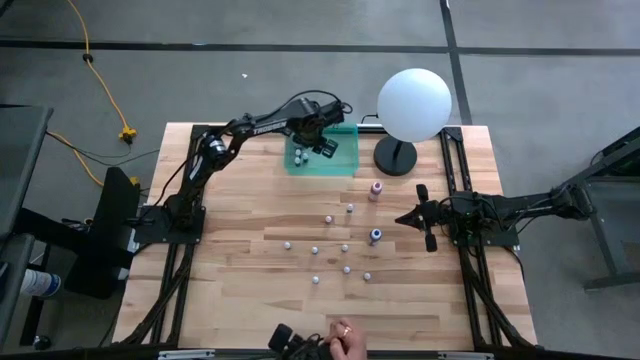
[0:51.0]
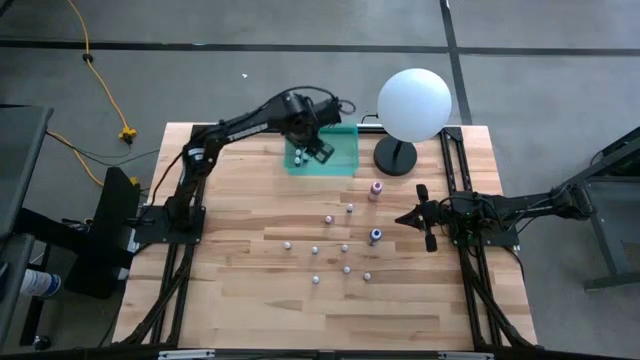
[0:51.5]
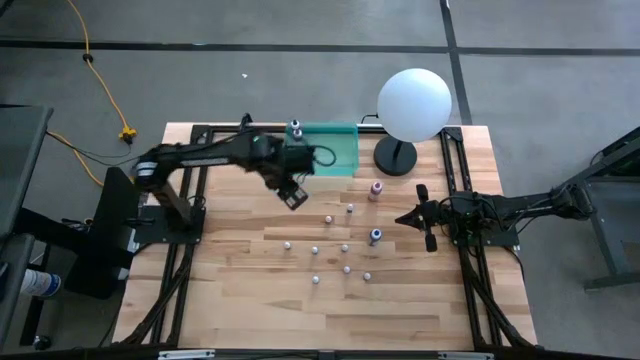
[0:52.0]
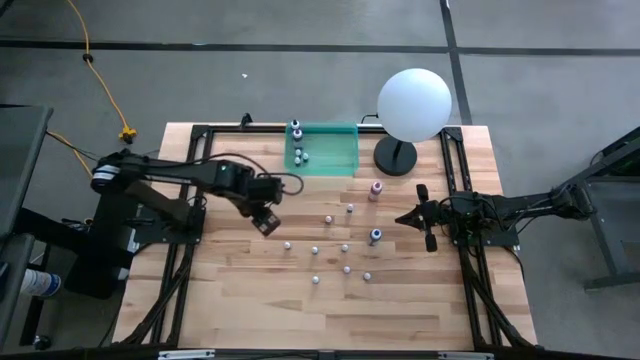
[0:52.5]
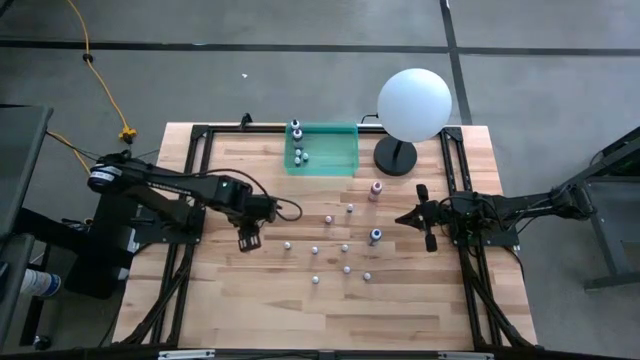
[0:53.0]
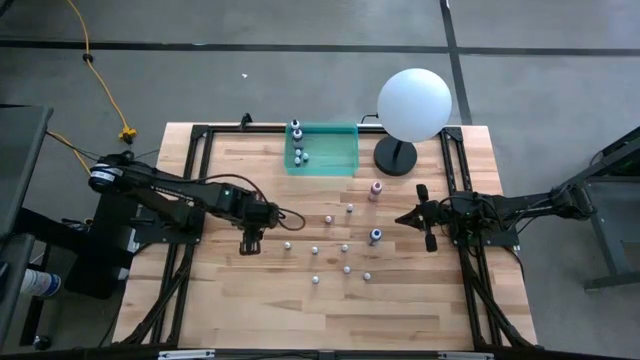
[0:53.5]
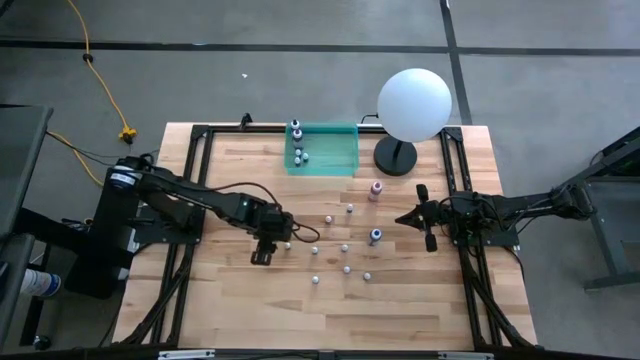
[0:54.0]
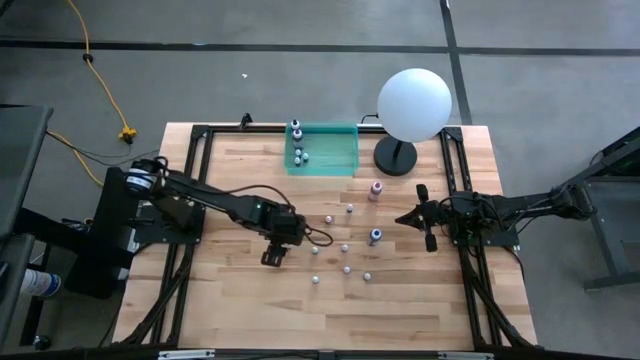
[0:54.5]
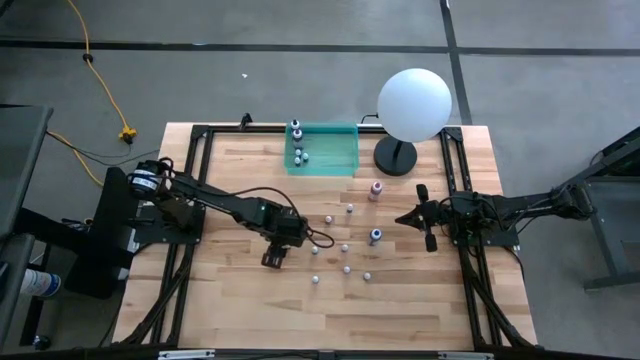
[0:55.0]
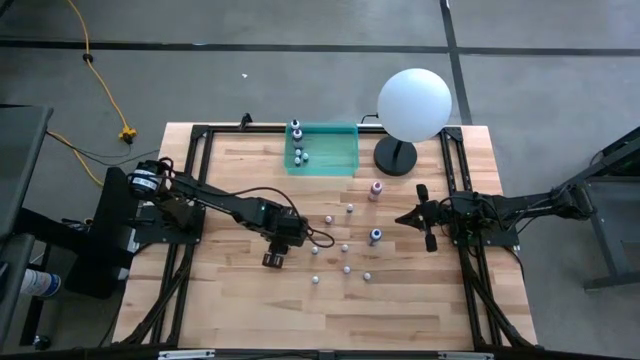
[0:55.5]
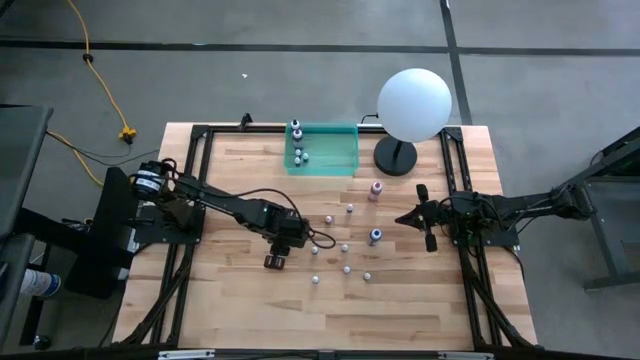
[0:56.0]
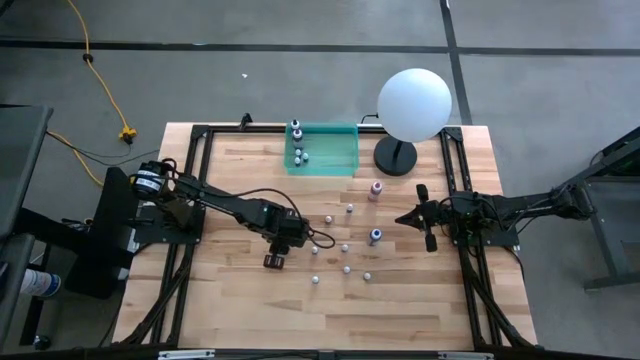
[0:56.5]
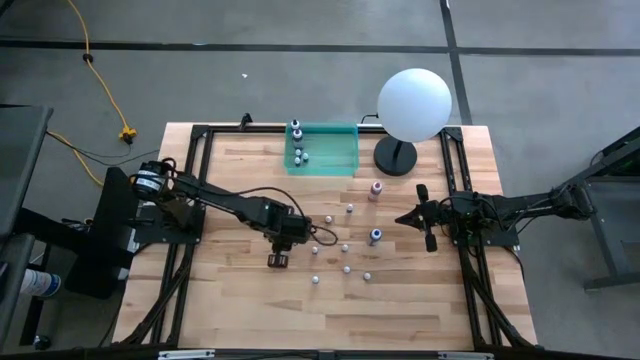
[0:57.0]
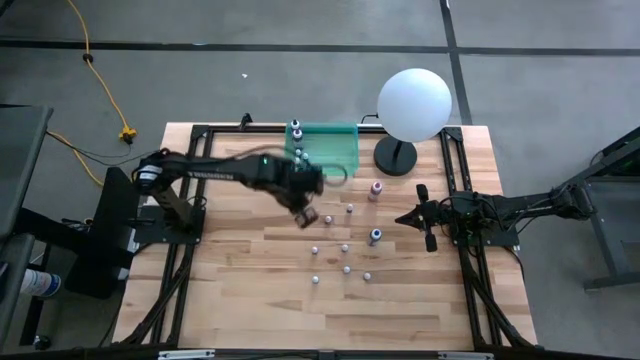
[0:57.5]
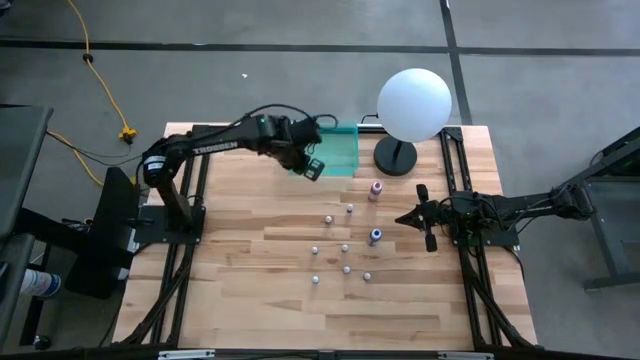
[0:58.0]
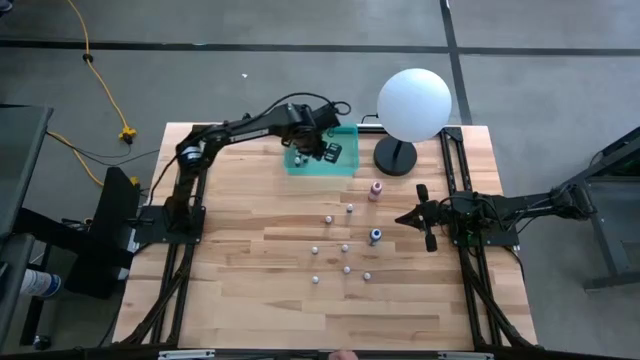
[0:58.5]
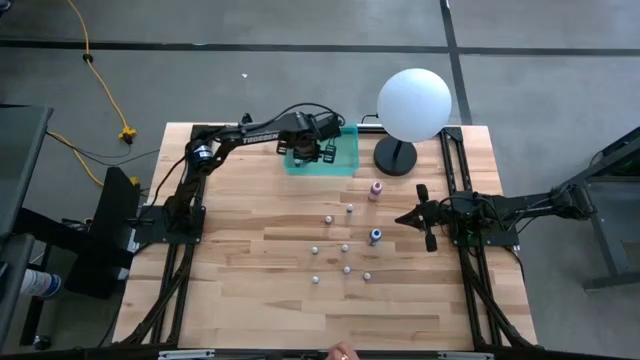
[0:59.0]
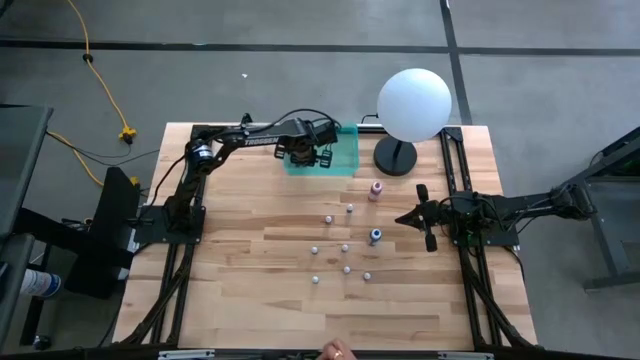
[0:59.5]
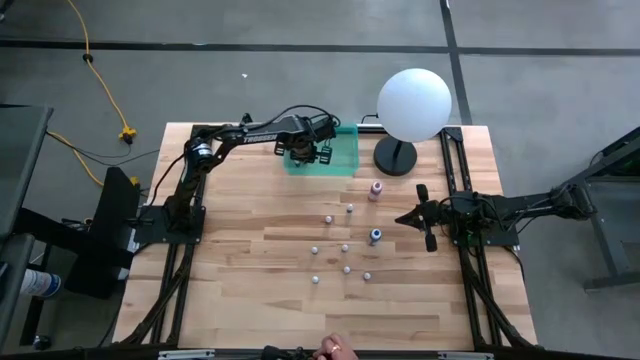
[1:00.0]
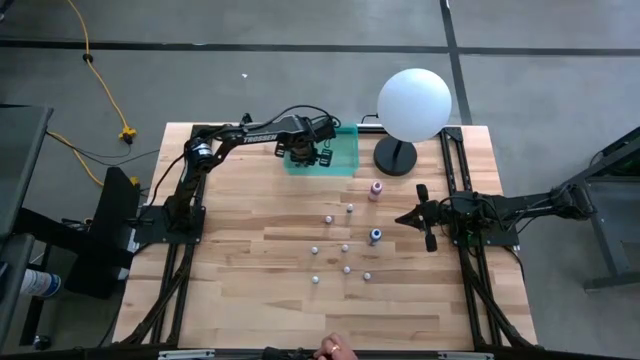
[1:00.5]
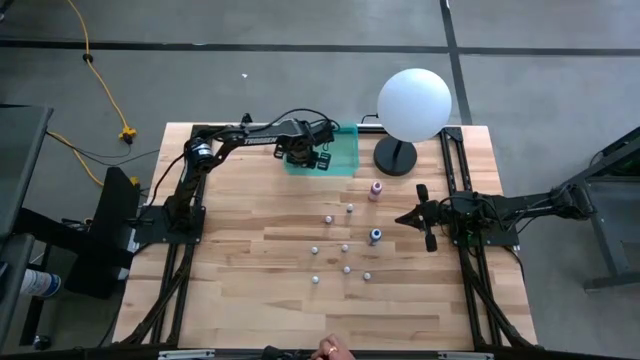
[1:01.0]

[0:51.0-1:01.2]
Task: Pick & Place food coloring
Put the small black food coloring bottle into the bin

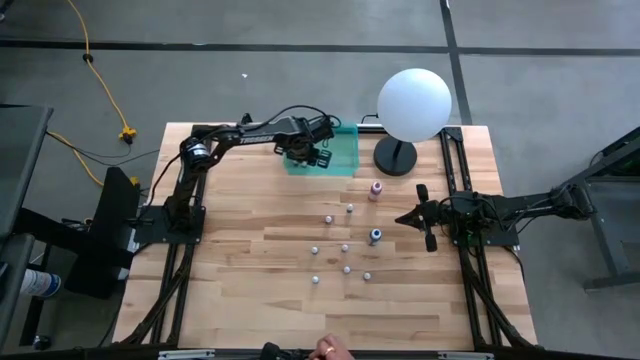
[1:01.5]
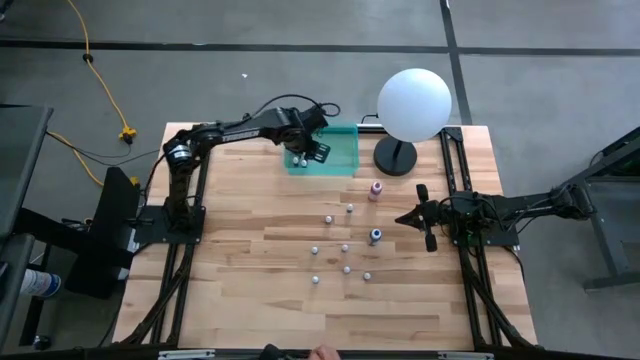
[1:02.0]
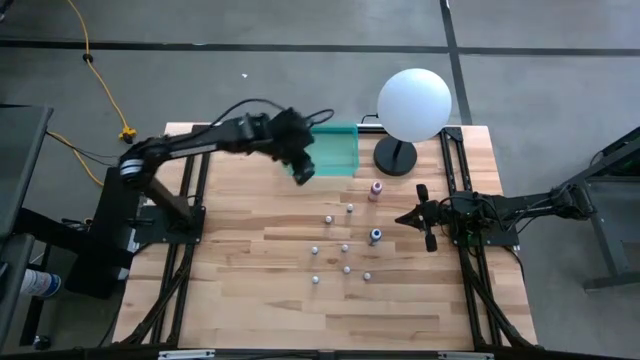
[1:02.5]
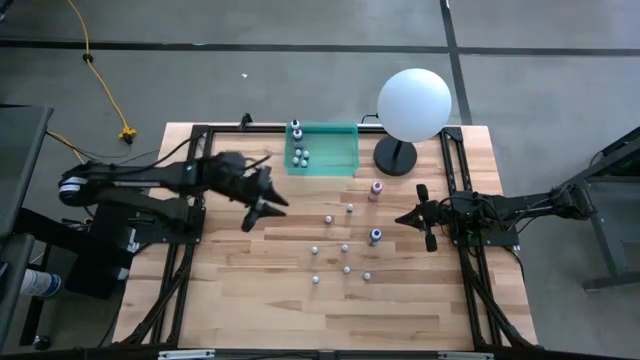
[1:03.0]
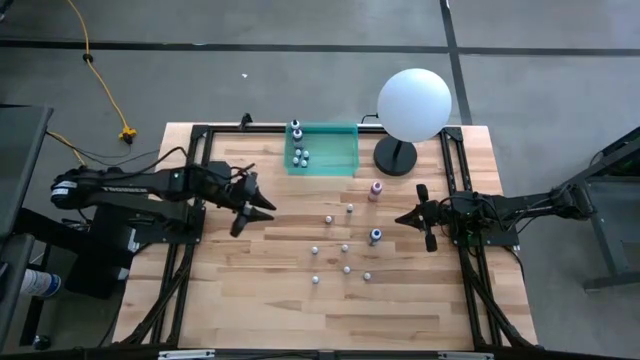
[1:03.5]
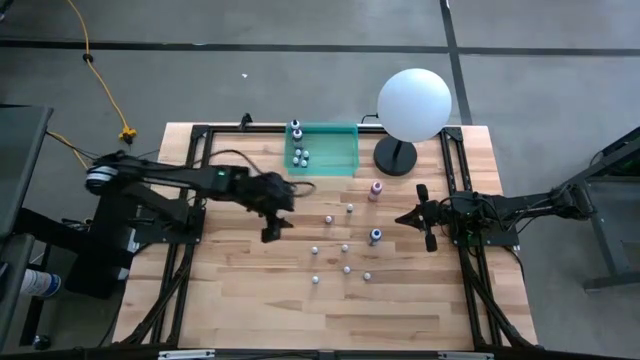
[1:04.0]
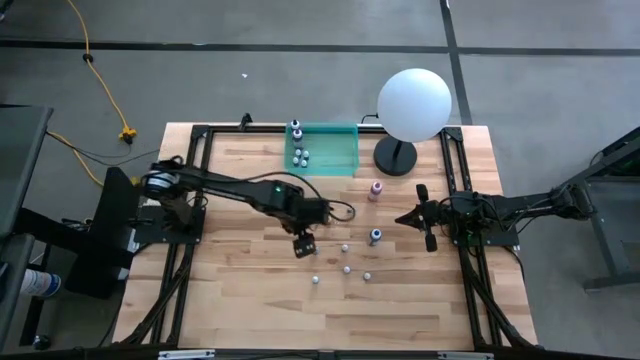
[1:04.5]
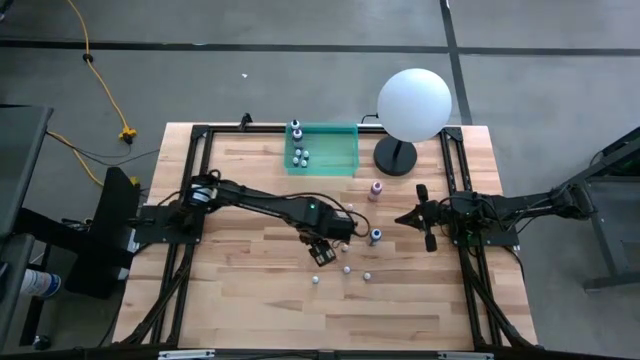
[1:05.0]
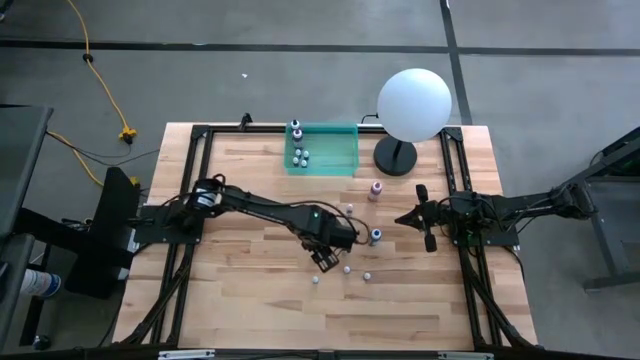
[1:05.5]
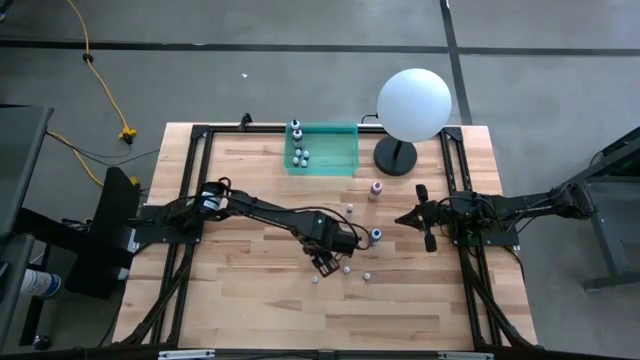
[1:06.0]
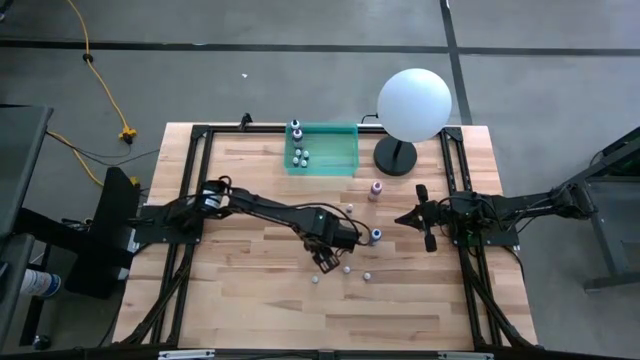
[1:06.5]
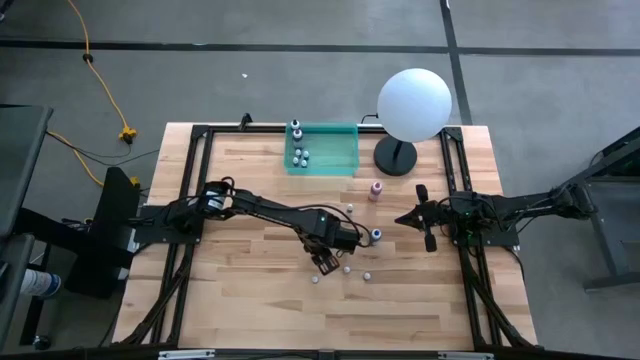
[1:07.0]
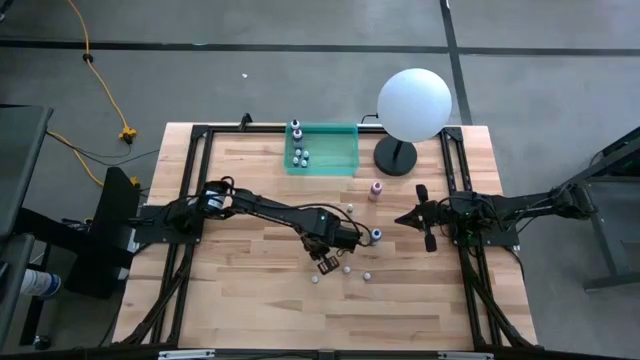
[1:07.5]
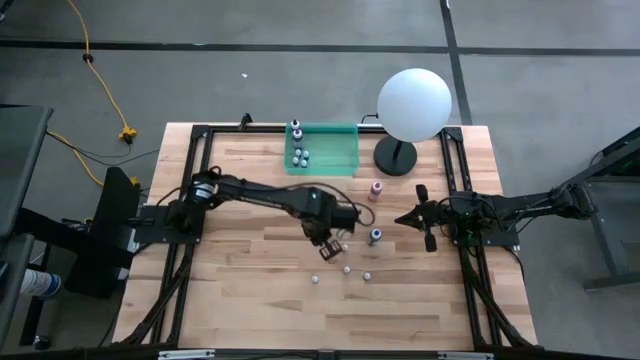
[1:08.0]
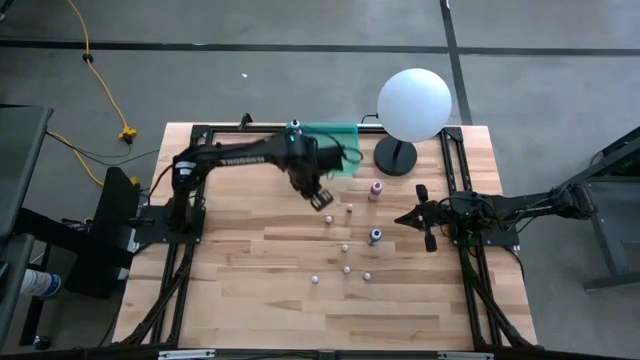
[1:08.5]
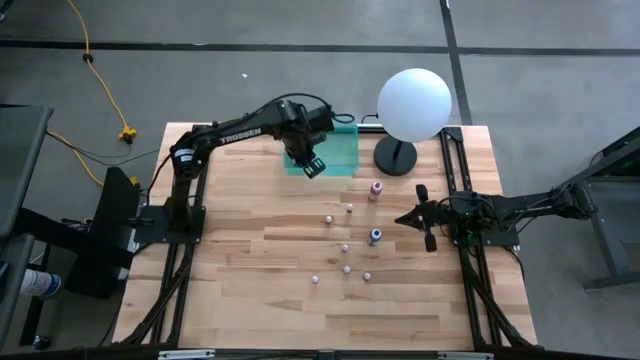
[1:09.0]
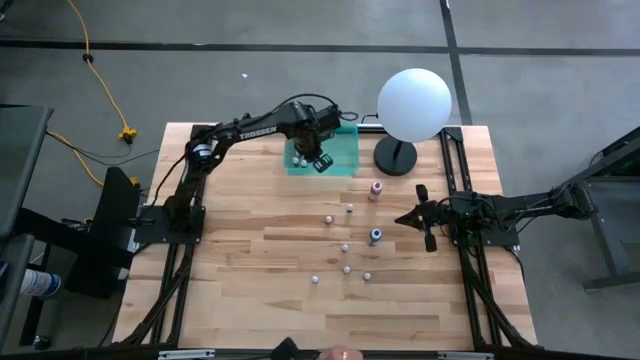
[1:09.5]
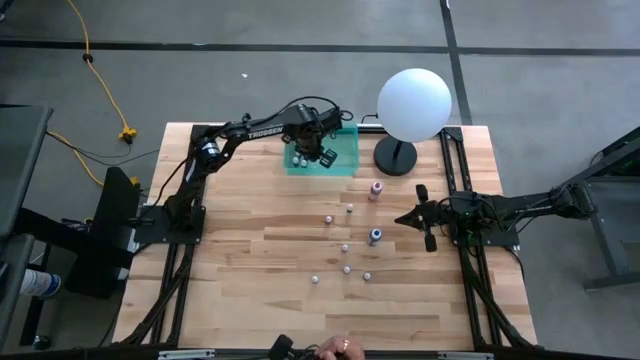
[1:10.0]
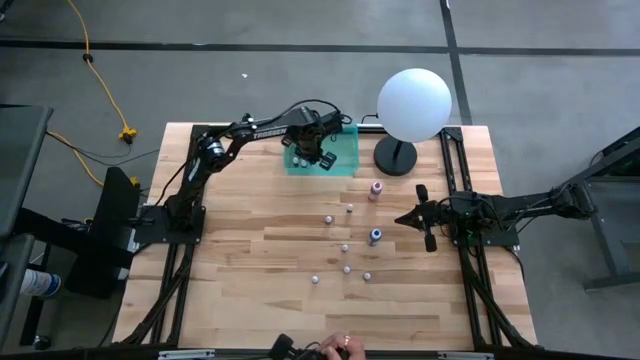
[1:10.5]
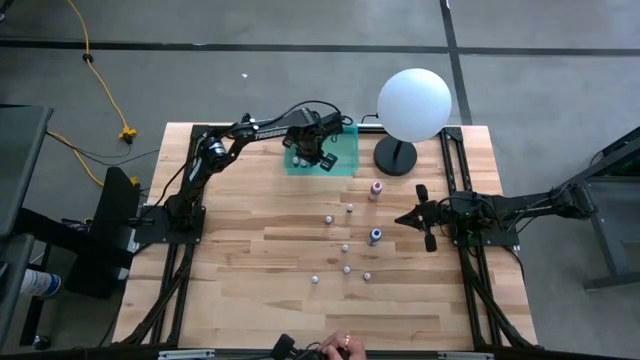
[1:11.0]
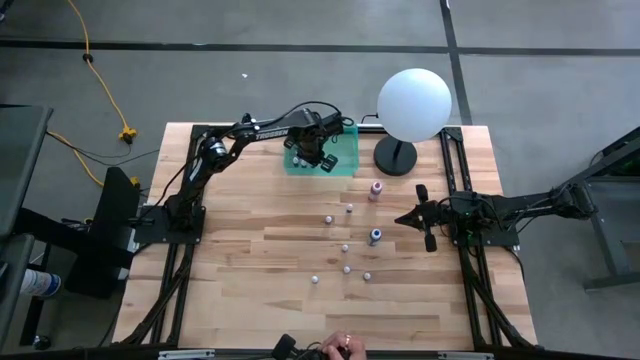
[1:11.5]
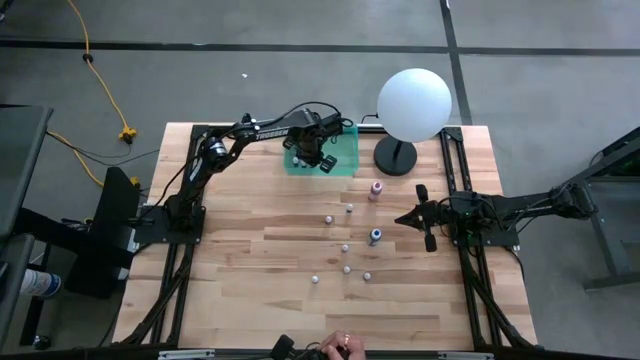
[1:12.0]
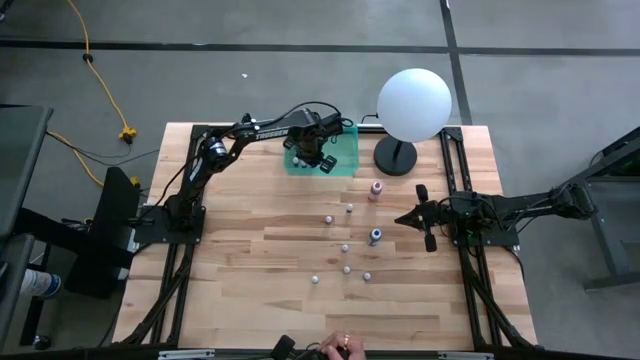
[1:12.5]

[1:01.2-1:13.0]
Put the small green food coloring bottle into the bin
